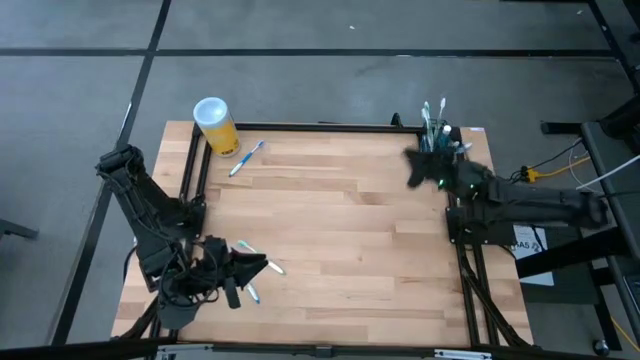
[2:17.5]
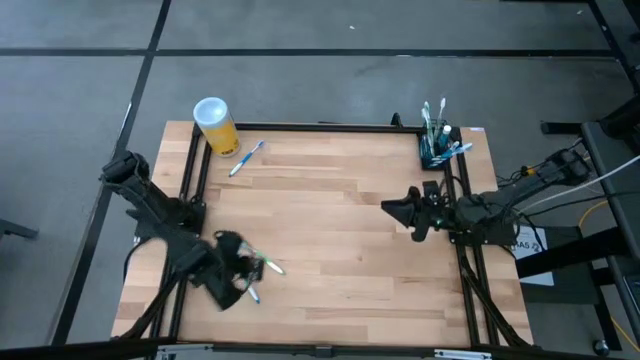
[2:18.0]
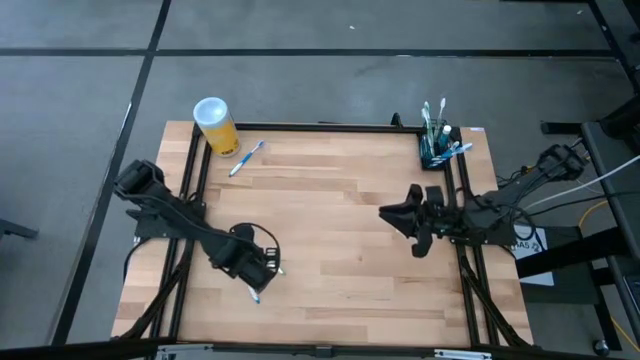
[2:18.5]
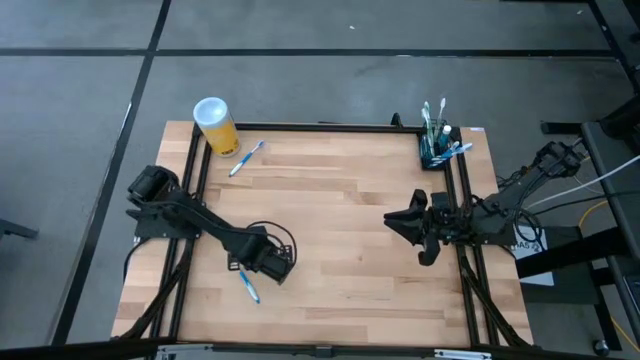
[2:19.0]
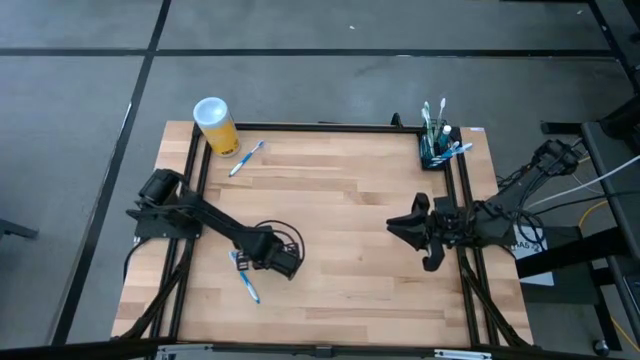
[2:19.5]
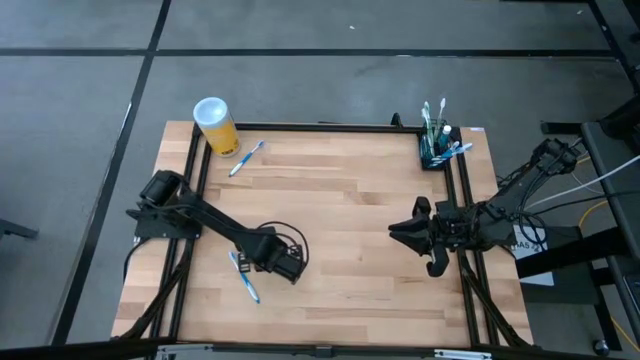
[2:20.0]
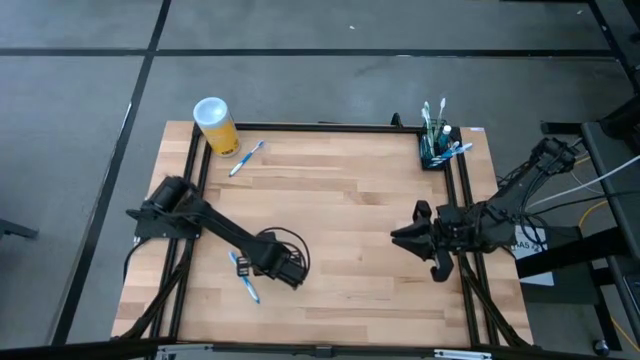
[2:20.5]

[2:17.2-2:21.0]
Task: Pick & Place toothbrushing station
Put the green toothbrush into the mesh organizer

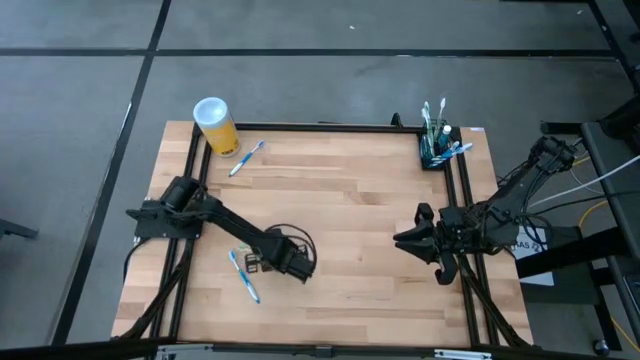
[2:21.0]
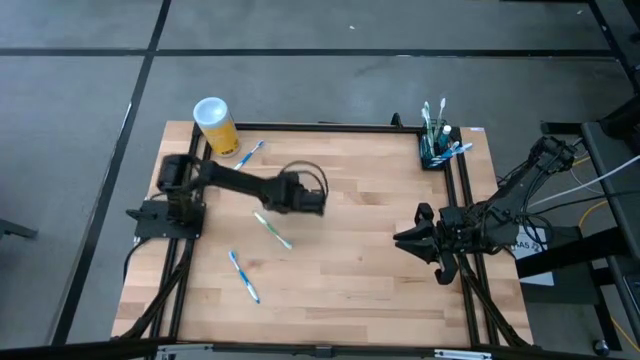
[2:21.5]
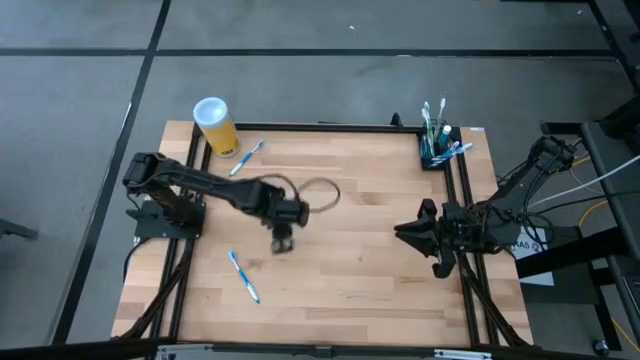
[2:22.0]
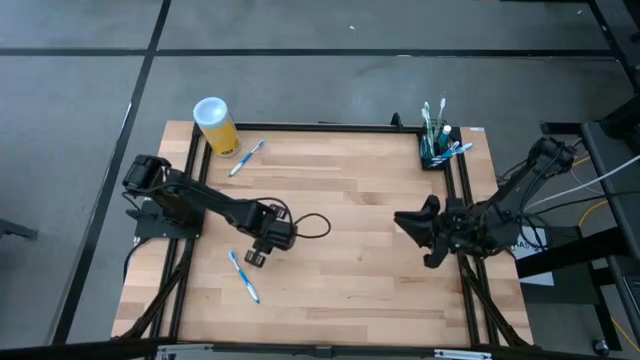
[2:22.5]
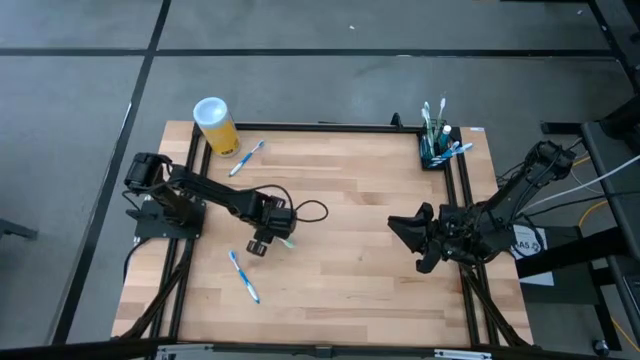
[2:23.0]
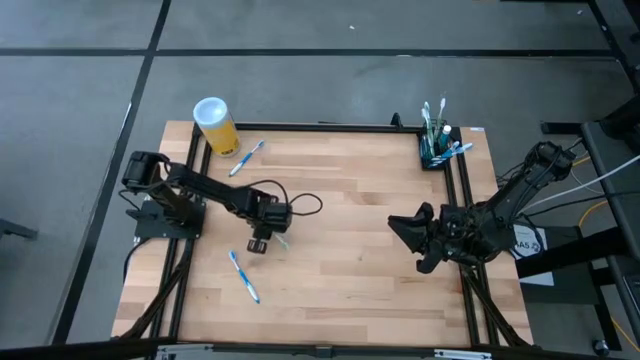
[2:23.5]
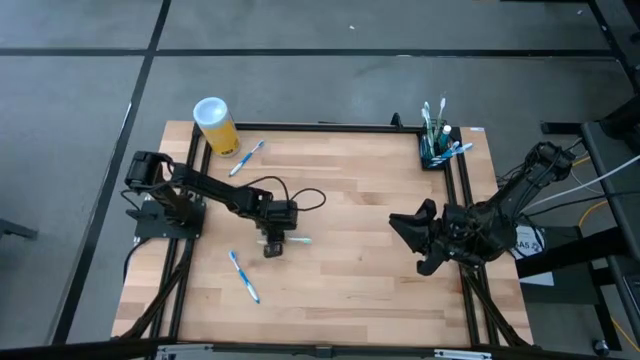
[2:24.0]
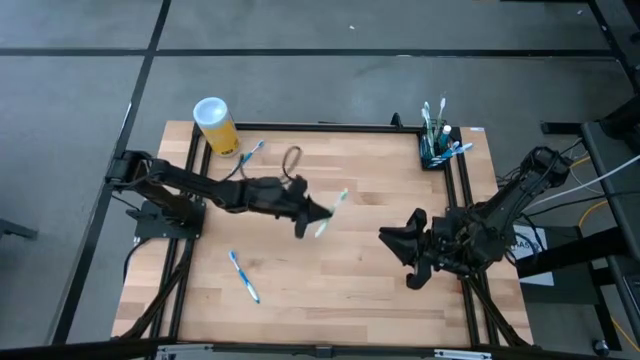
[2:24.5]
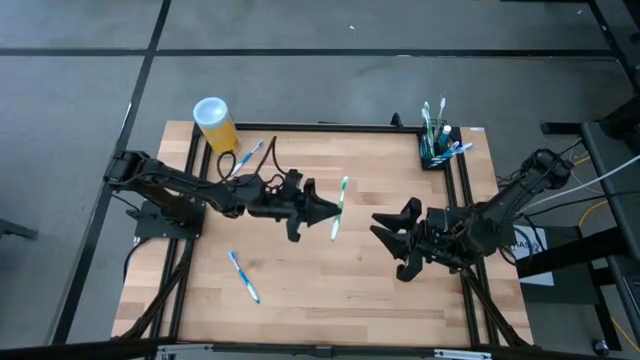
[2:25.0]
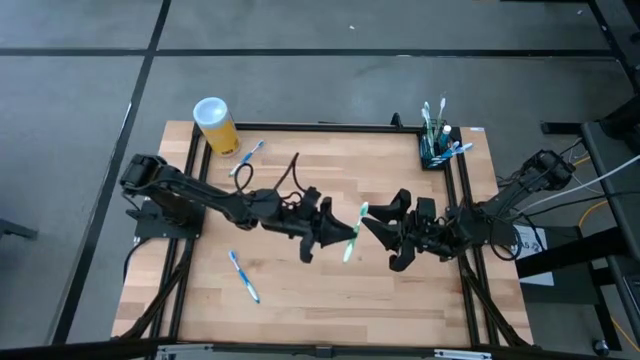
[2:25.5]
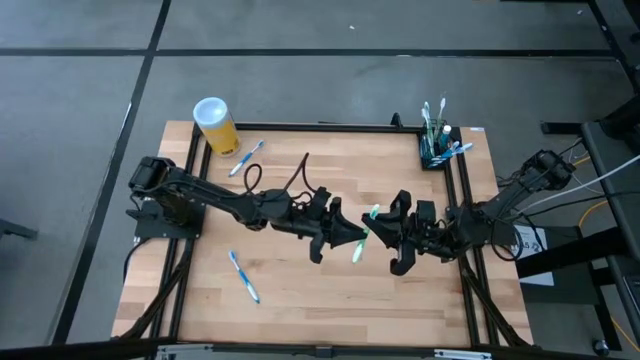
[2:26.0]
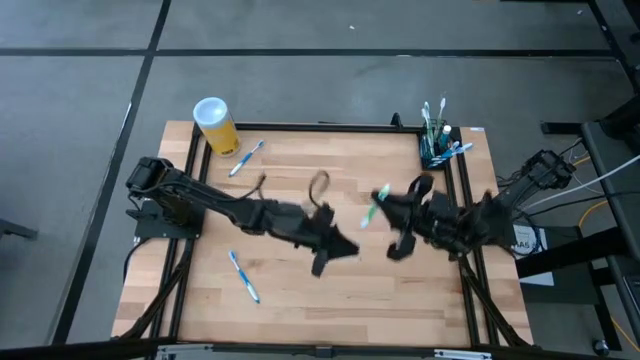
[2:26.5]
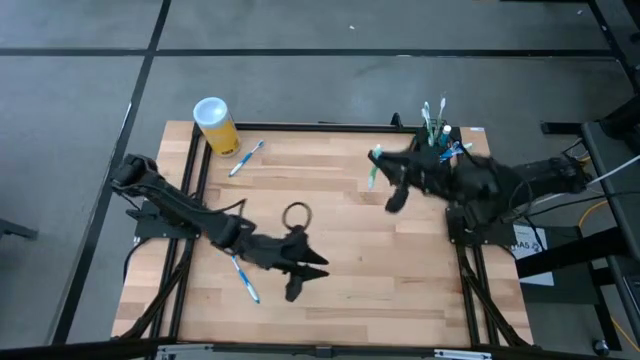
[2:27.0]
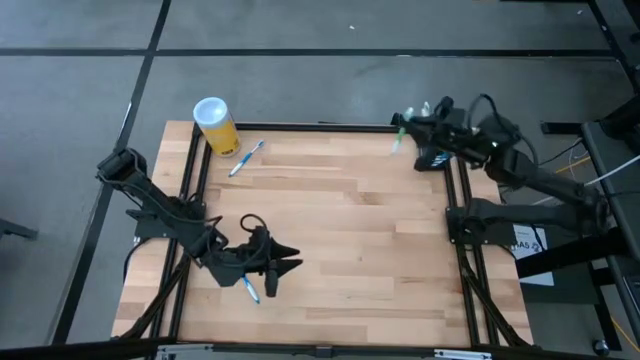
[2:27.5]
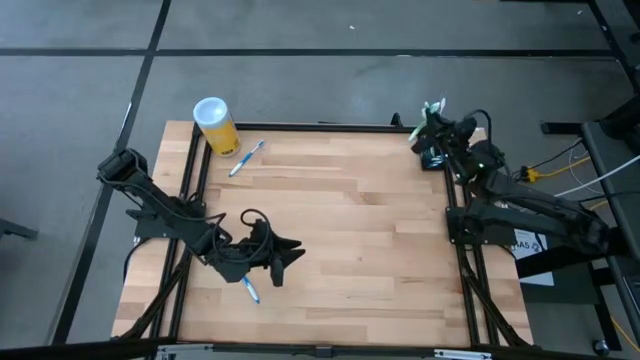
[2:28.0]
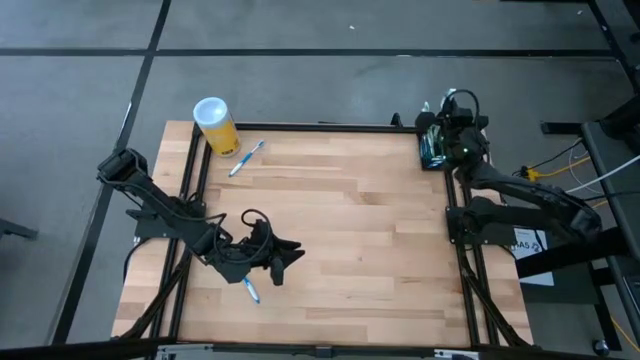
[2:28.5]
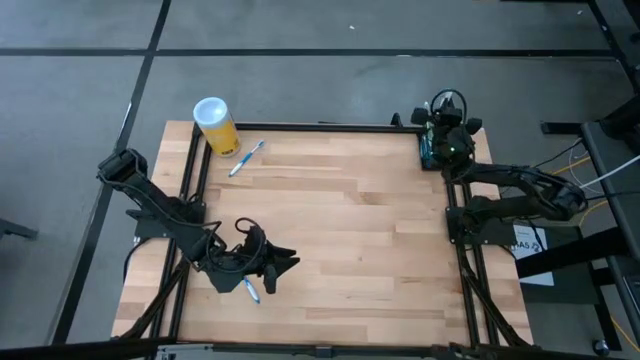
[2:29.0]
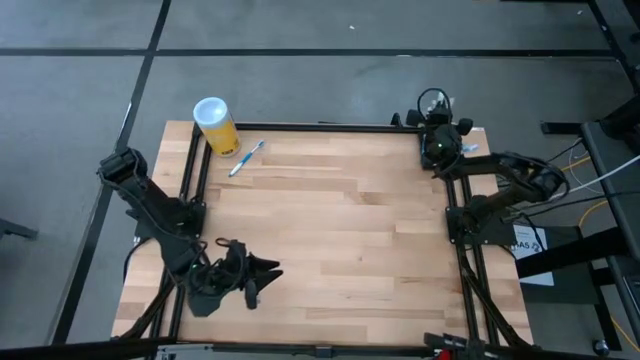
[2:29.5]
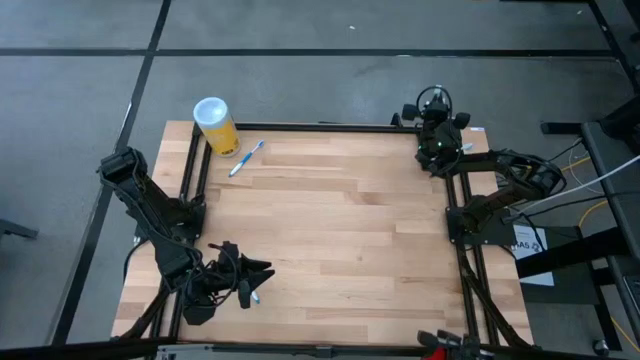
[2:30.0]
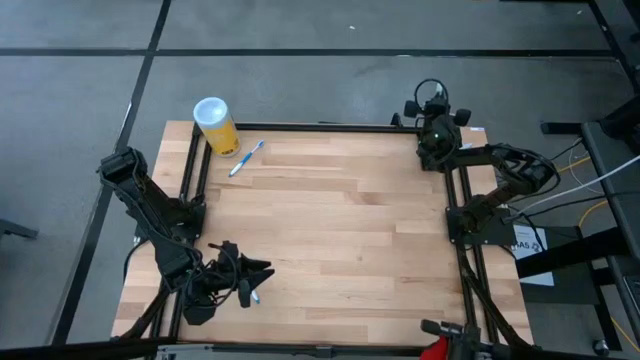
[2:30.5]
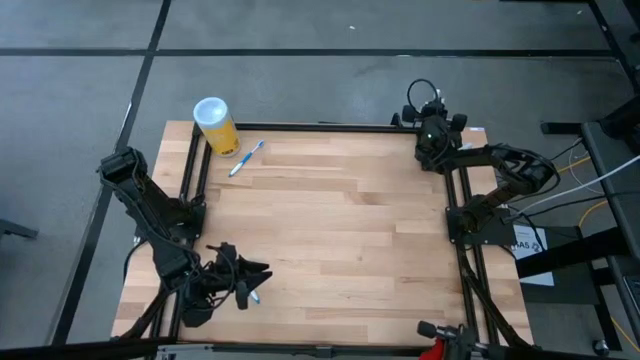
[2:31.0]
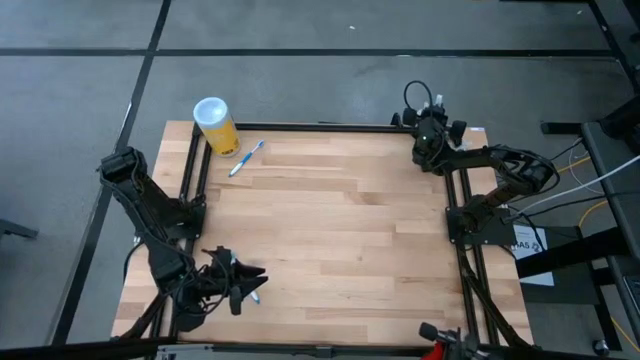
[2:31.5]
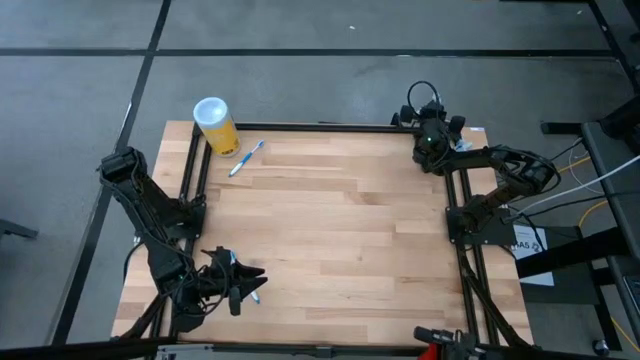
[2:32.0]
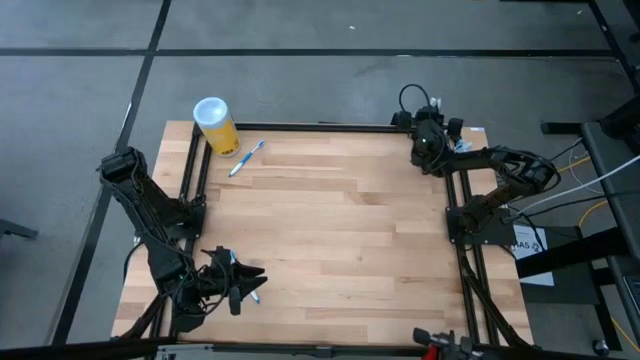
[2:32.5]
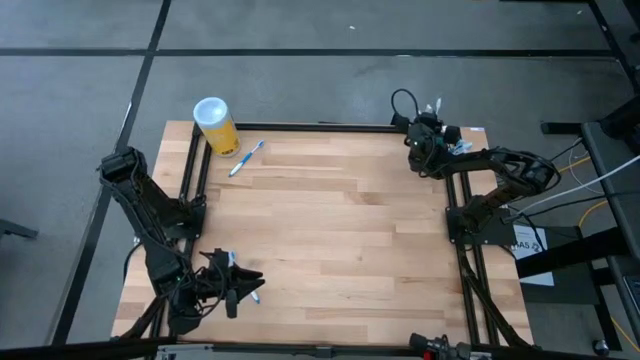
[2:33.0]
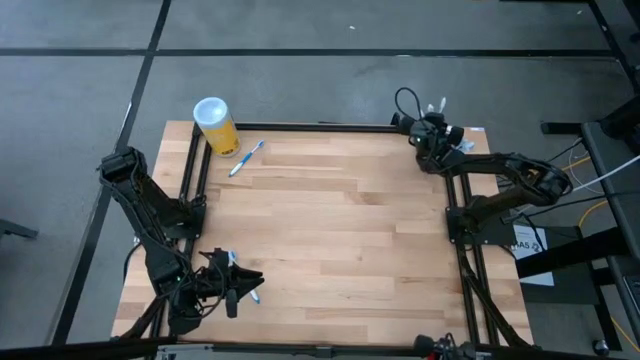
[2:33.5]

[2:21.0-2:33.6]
Put the green toothbrush into the mesh organizer

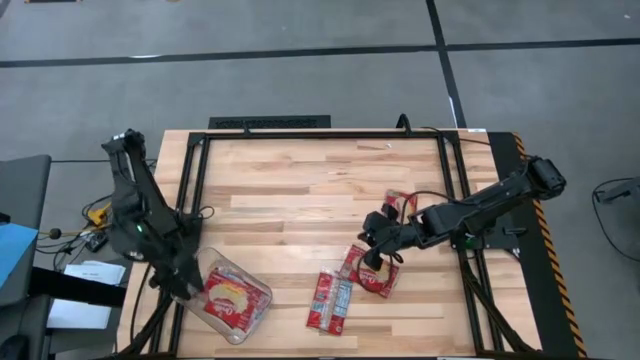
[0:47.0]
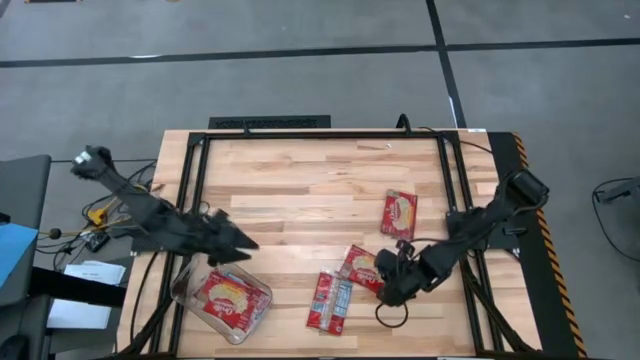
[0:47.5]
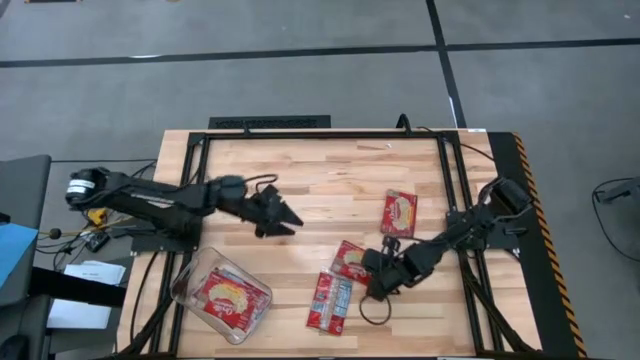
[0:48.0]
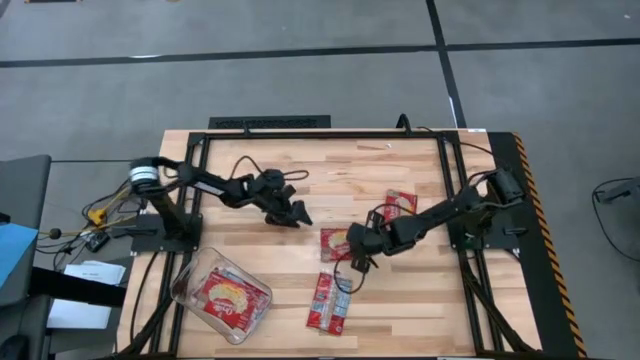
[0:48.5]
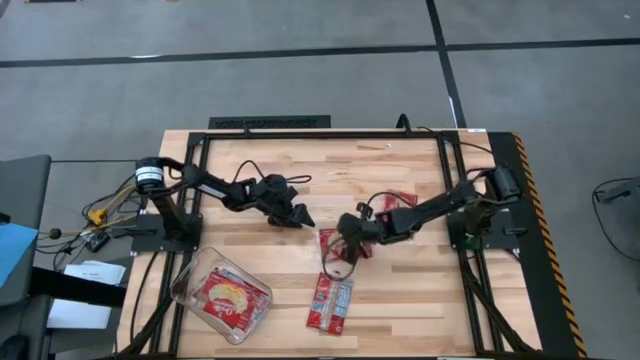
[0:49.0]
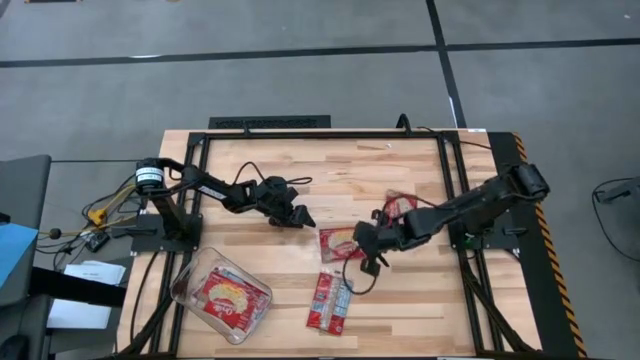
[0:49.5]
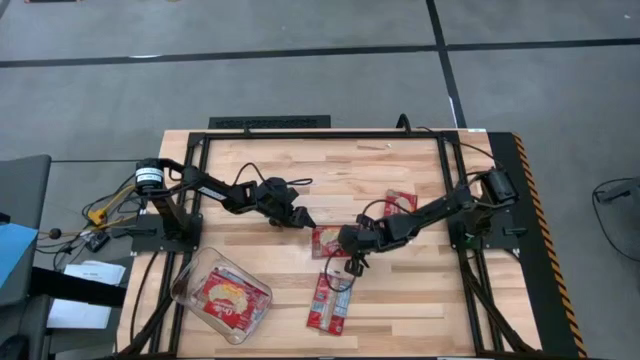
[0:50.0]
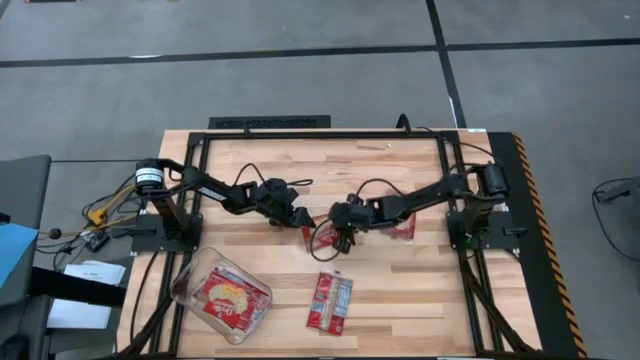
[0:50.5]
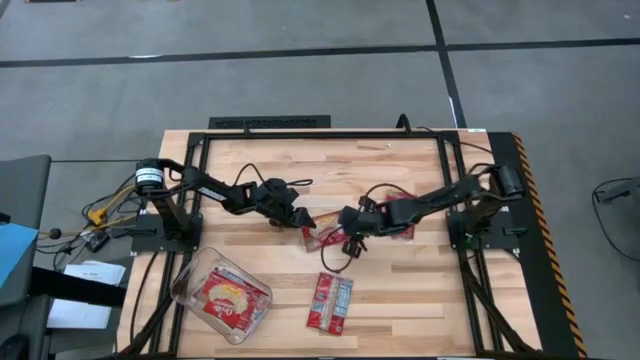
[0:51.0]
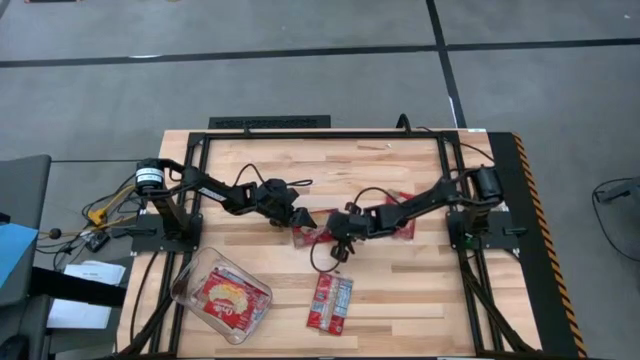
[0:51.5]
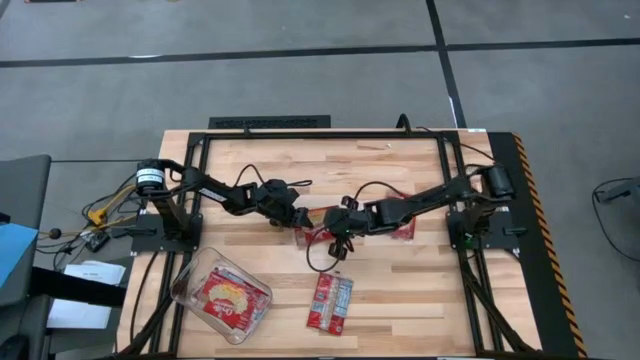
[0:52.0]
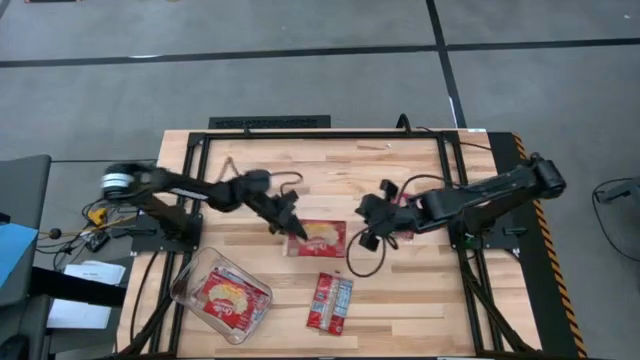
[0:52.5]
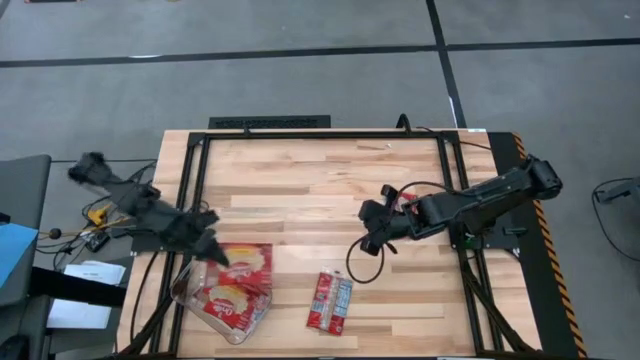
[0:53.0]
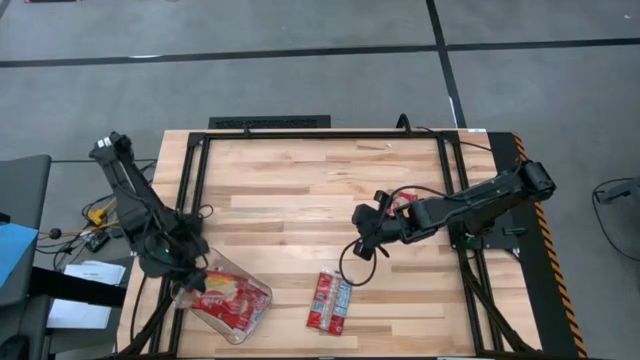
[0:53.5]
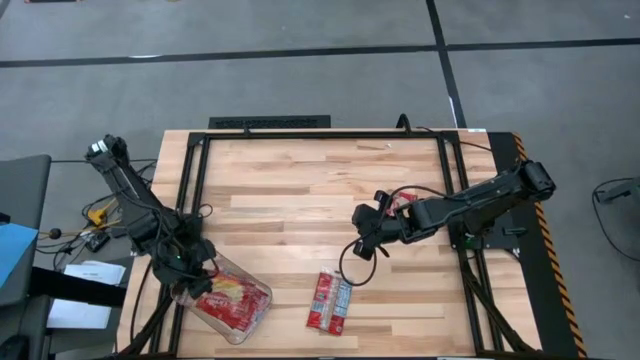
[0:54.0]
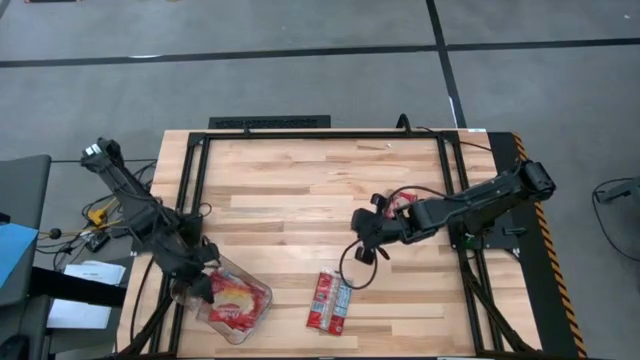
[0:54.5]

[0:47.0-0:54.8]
Task: Sort popcorn bags into baskets
Put the red popcorn bag into the transparent bin
